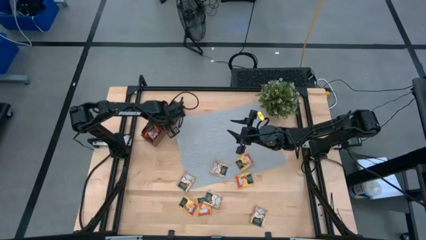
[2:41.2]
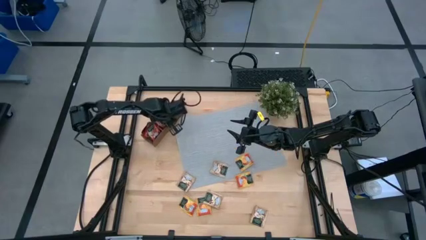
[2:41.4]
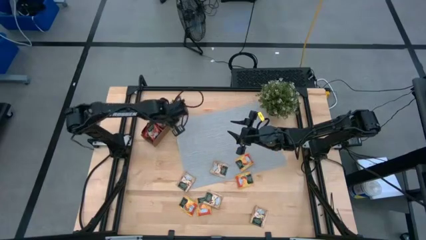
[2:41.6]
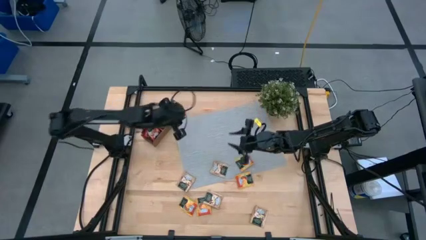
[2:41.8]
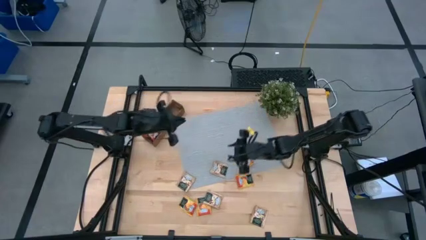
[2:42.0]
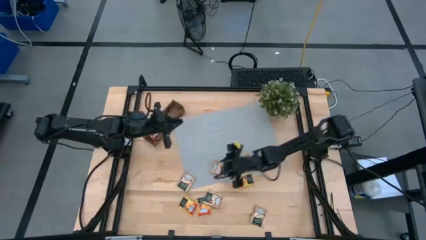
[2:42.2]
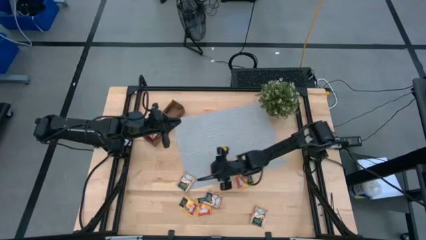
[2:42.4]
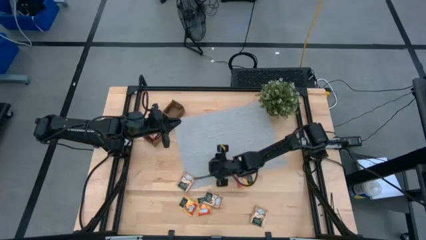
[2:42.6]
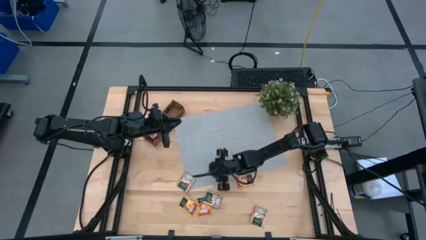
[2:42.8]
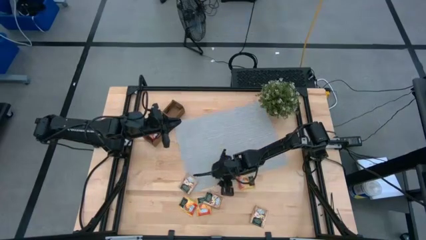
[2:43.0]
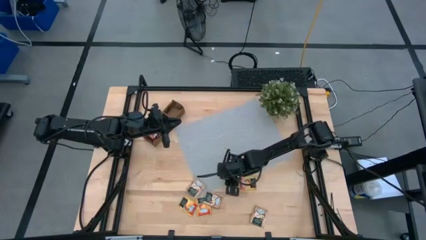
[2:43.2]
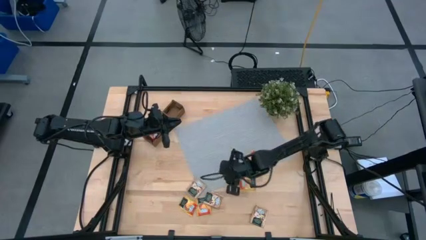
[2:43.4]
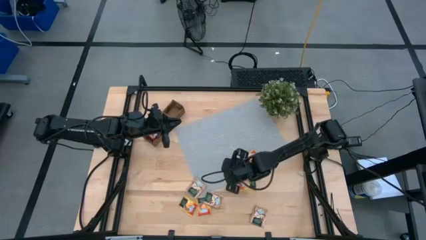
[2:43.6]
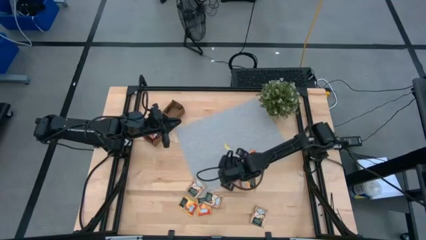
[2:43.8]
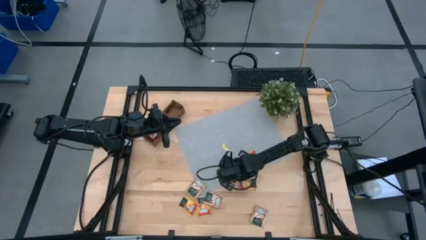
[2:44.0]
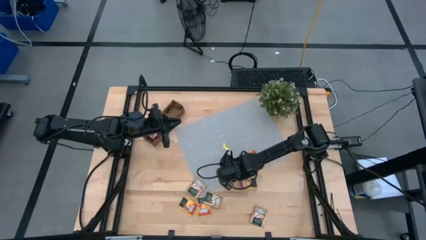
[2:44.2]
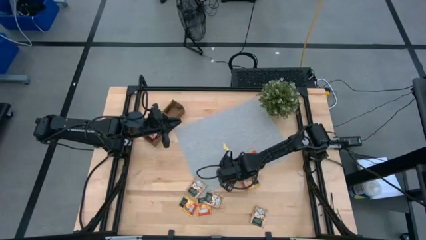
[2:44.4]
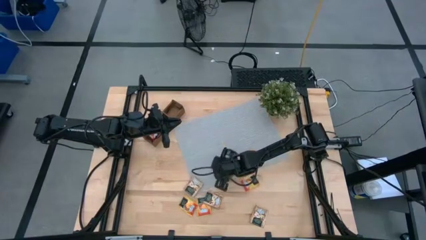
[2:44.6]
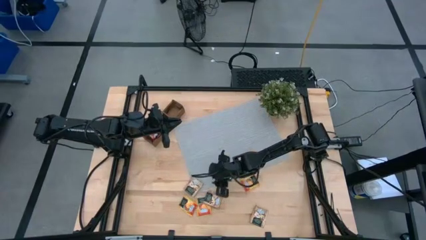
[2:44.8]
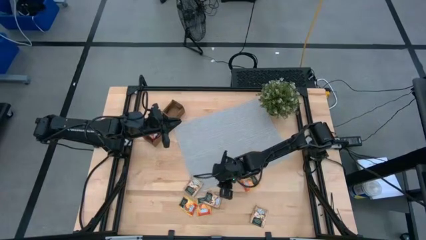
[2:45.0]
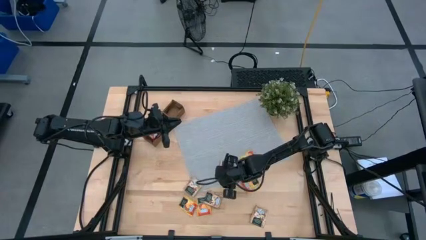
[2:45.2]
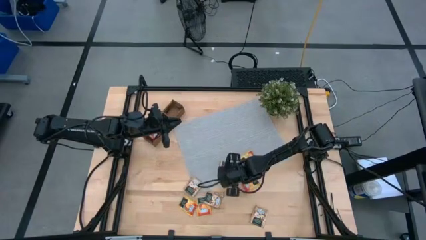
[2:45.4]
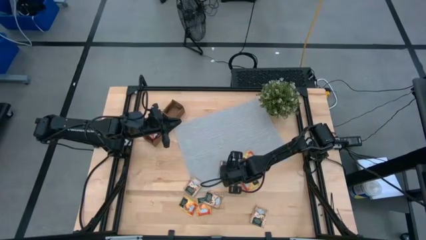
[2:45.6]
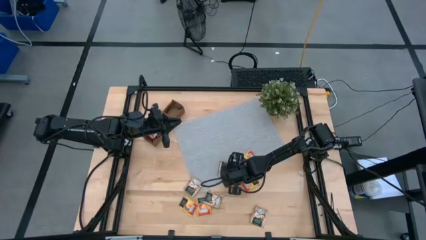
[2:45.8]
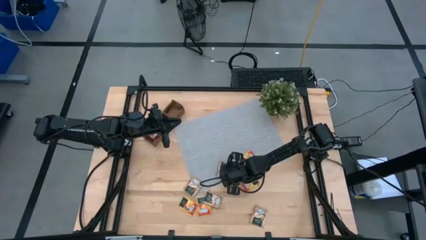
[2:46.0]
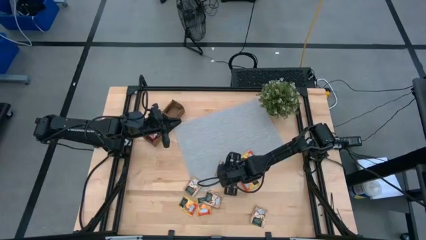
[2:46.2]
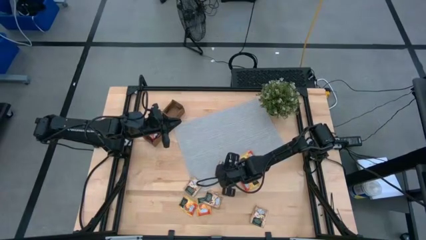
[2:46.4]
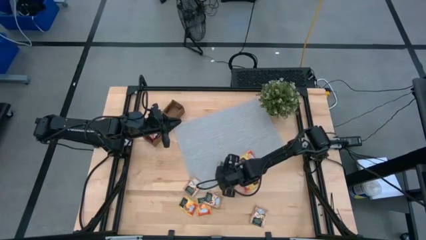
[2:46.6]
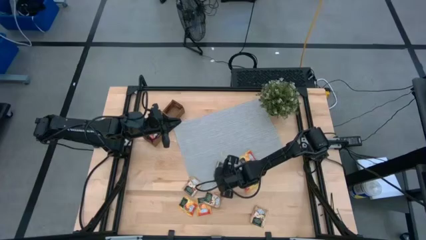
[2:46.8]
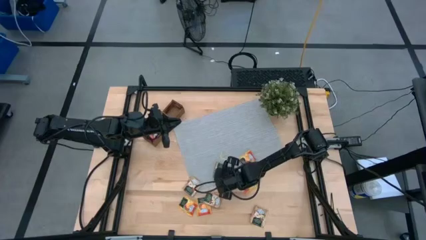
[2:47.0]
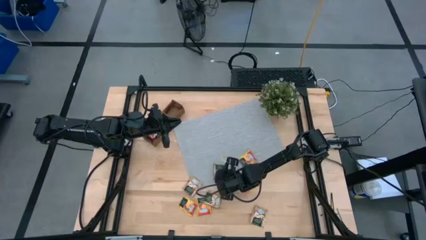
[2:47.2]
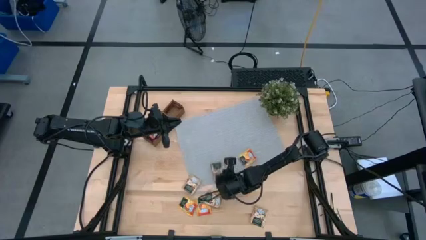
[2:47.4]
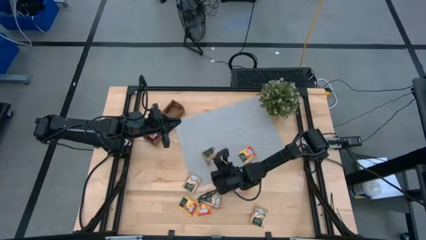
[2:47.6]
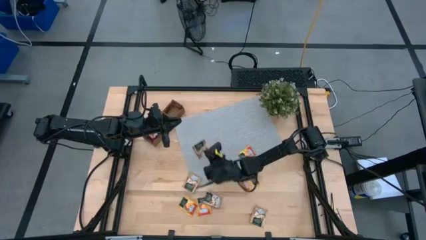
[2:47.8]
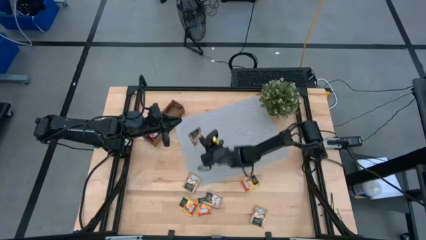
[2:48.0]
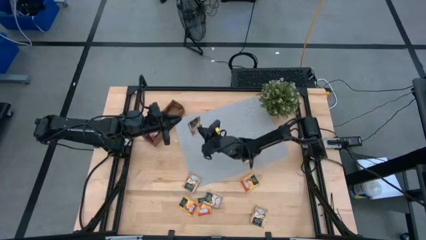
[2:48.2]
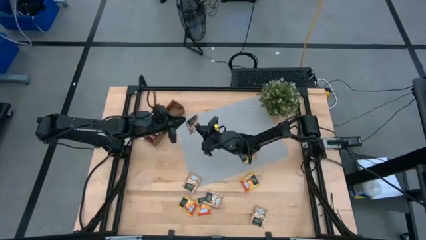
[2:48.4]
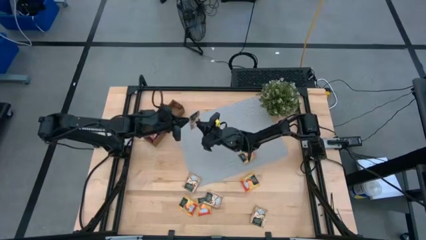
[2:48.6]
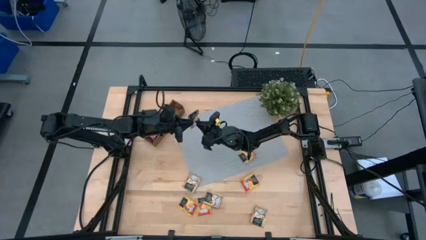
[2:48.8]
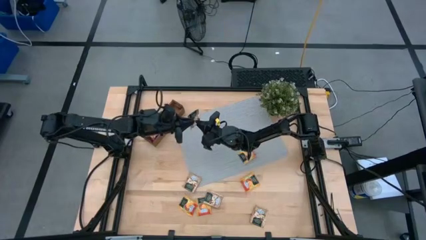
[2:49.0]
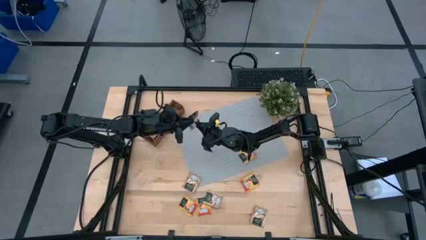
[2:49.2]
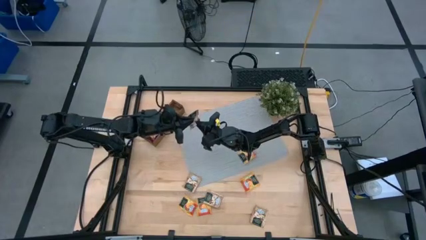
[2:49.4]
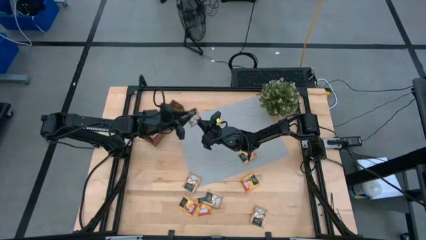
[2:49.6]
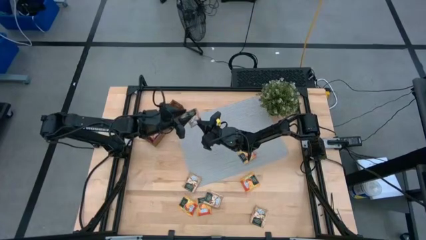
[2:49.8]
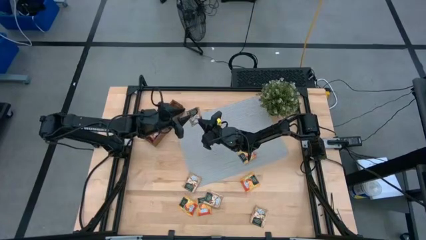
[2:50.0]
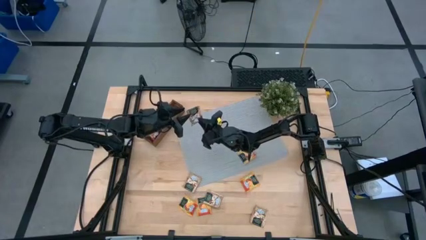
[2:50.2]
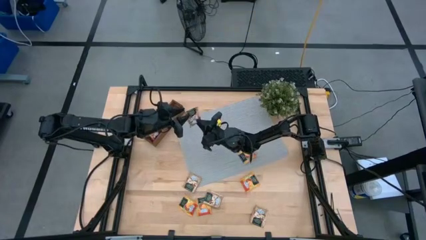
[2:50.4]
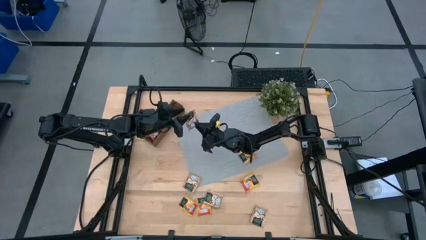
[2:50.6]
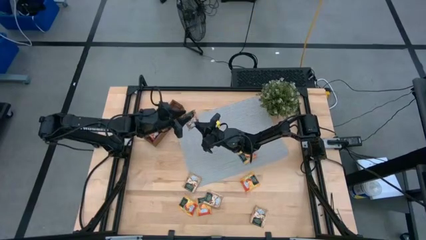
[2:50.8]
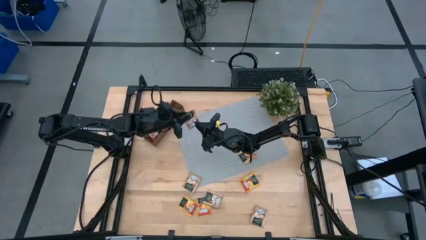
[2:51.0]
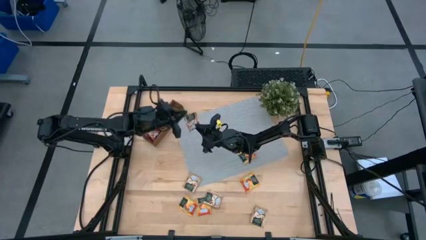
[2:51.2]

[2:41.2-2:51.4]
Task: Pick & Place Tea
Put the brown tea bag into the middle section of the wooden organizer

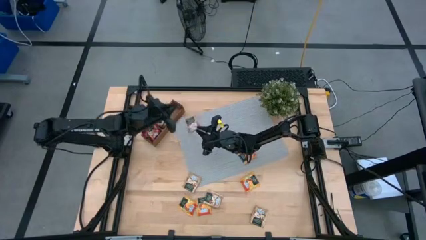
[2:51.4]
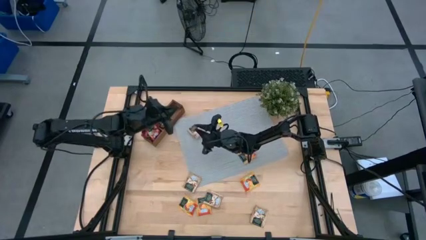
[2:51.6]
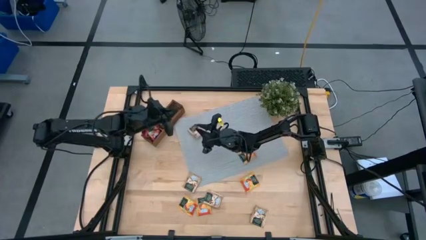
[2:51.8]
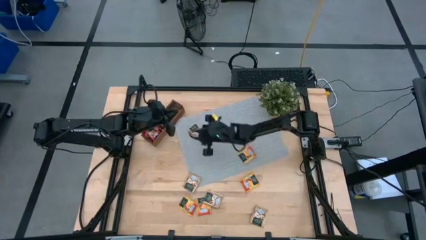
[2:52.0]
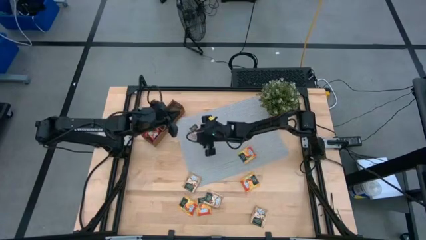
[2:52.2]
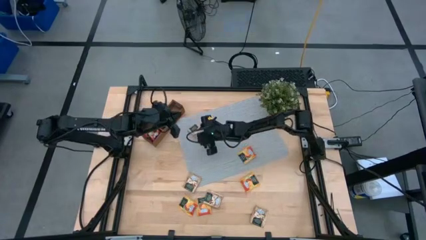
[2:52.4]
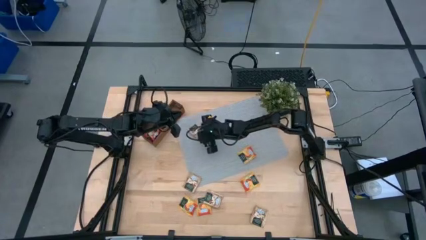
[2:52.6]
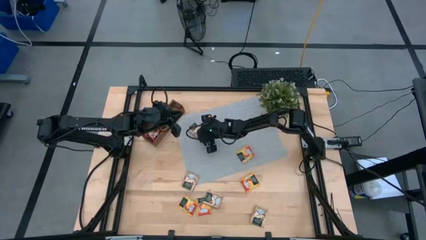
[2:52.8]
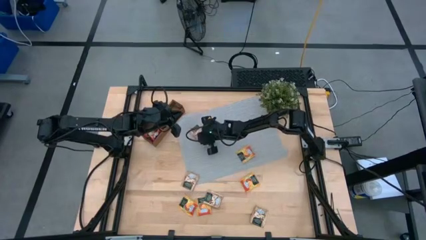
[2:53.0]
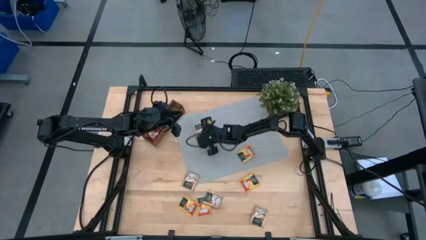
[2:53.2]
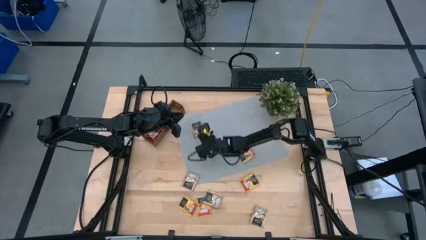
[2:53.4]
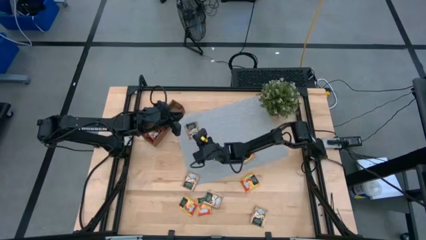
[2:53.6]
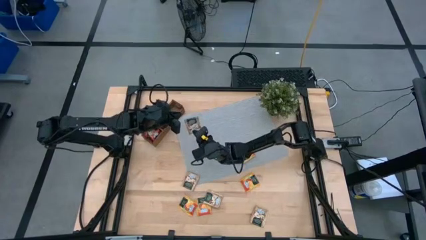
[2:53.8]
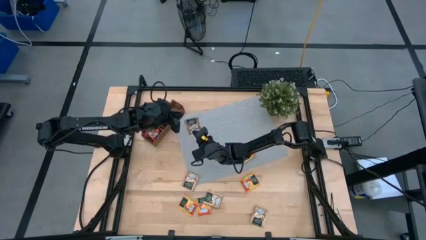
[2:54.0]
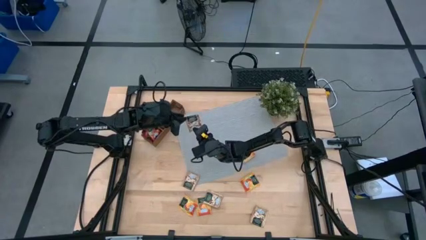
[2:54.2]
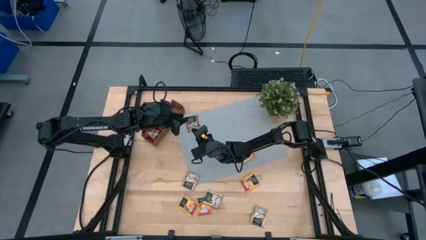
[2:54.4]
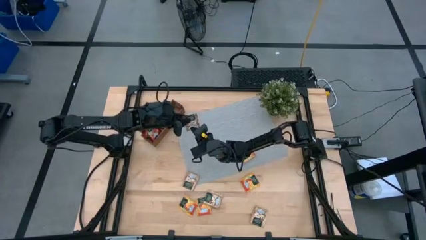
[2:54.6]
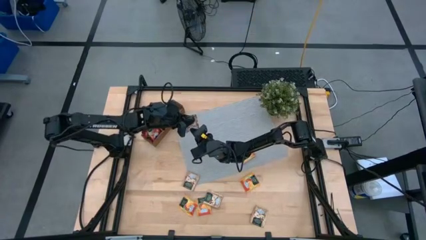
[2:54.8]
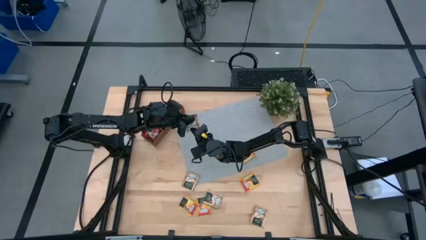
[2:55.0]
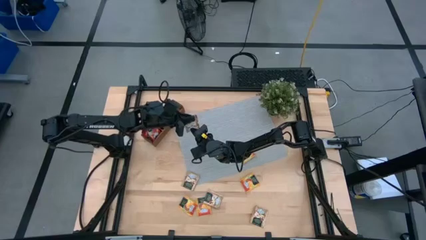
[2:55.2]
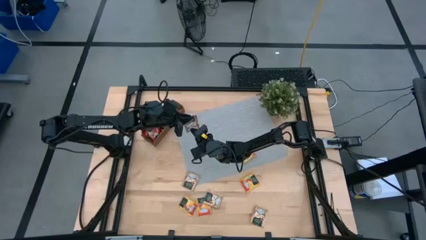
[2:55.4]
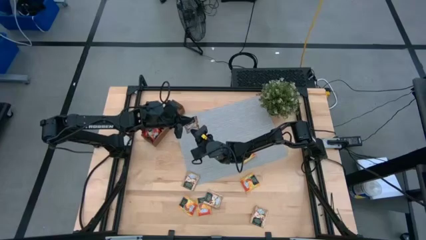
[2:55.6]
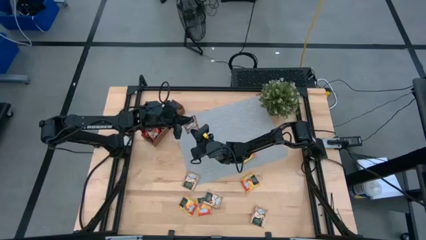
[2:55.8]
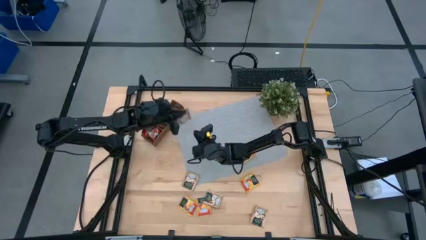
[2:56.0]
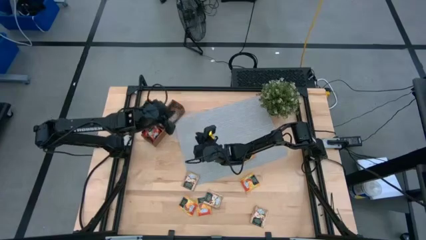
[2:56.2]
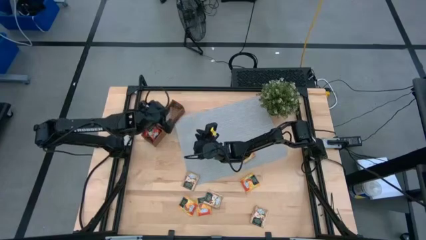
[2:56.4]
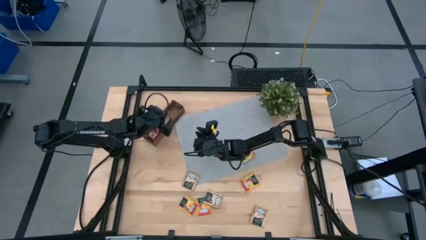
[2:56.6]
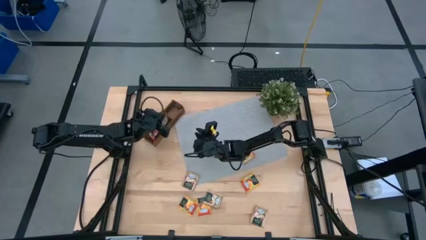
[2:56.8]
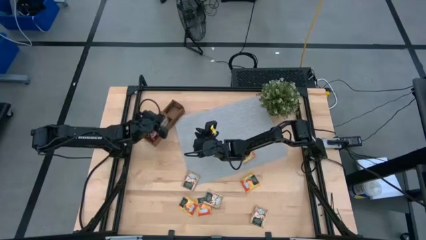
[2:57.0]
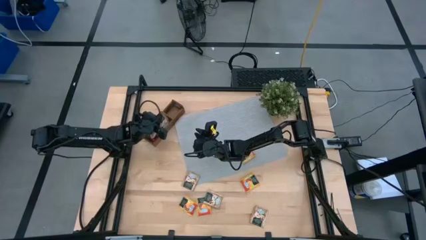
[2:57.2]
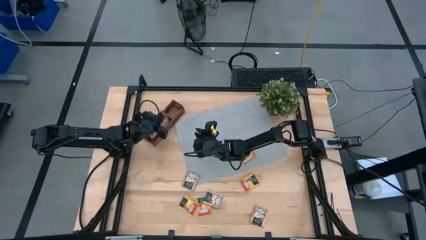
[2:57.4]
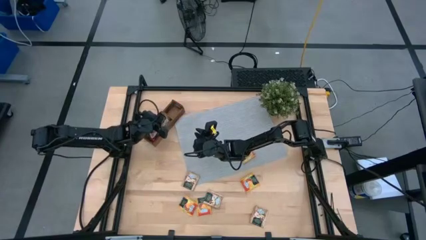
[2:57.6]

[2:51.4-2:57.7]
Put the brown tea bag into the middle section of the wooden organizer
